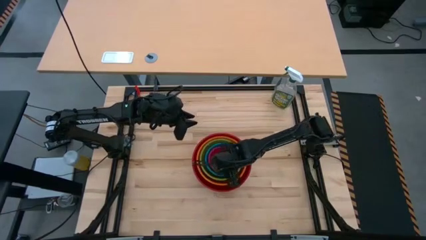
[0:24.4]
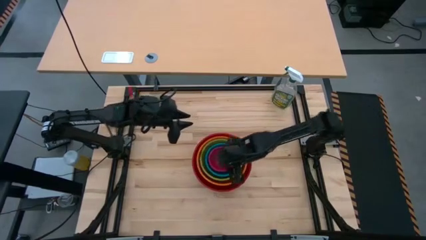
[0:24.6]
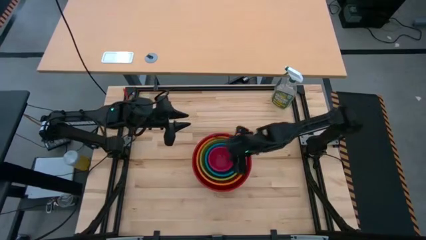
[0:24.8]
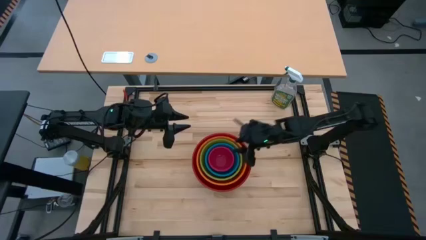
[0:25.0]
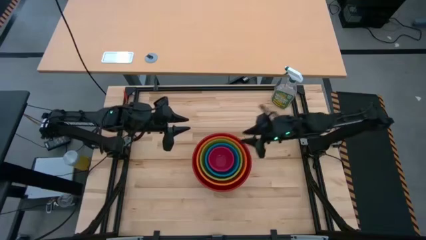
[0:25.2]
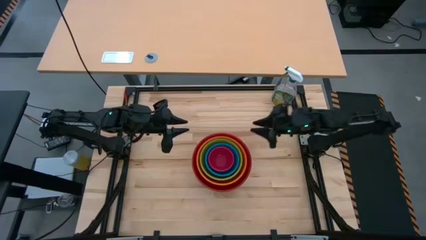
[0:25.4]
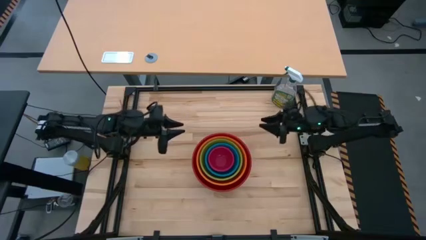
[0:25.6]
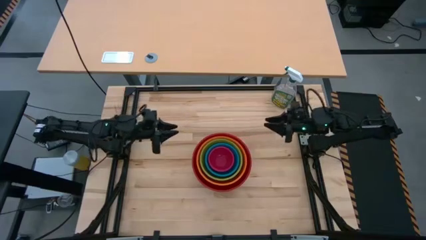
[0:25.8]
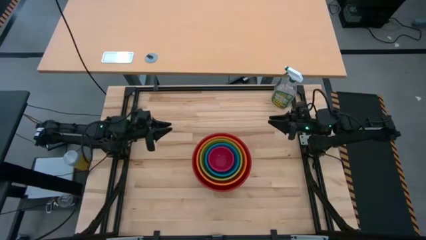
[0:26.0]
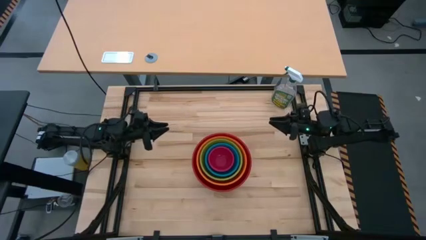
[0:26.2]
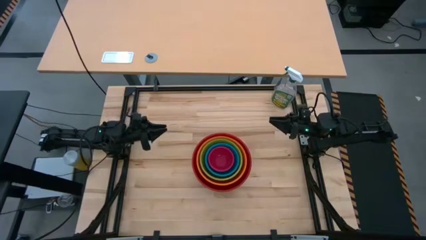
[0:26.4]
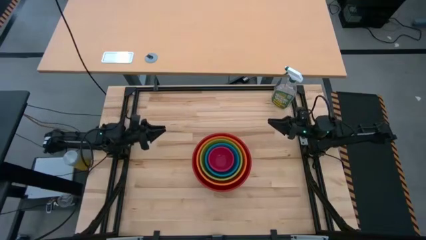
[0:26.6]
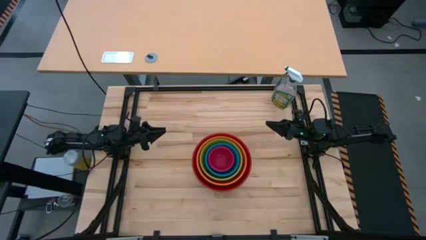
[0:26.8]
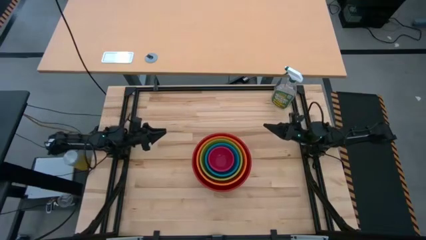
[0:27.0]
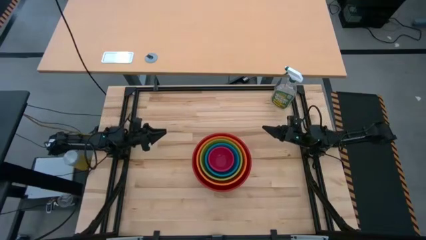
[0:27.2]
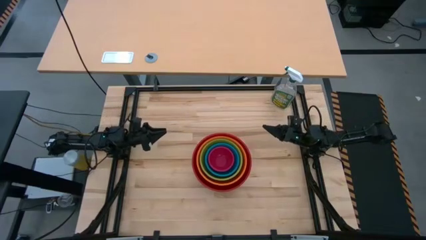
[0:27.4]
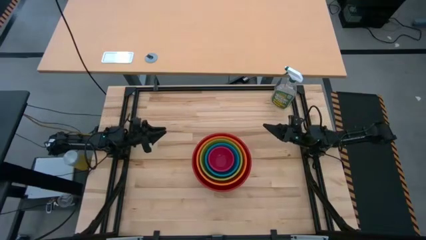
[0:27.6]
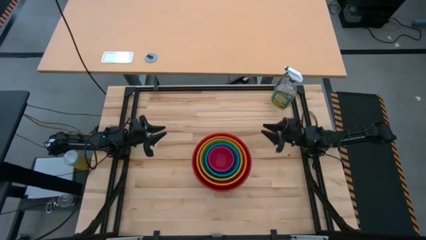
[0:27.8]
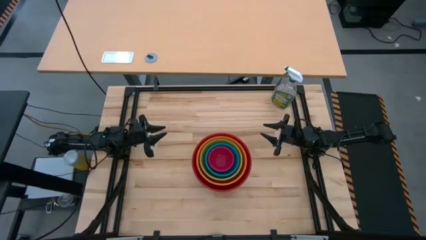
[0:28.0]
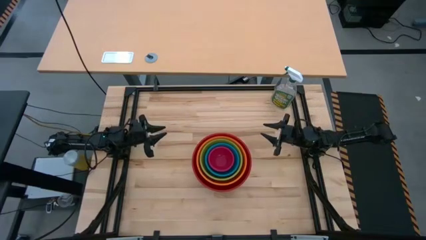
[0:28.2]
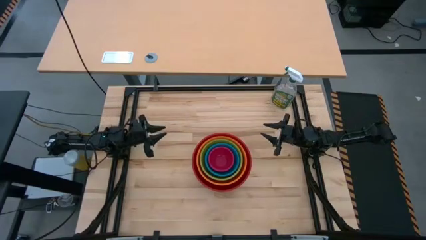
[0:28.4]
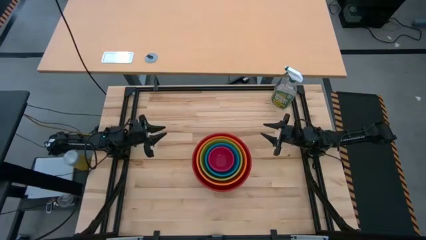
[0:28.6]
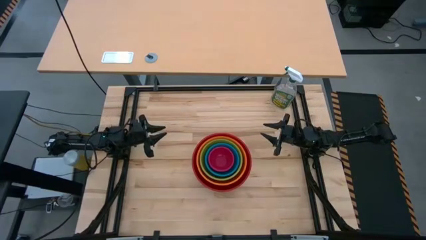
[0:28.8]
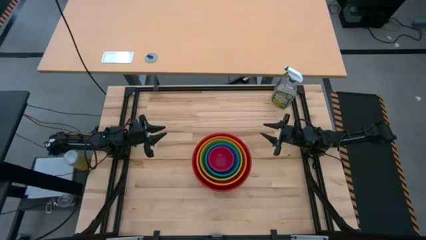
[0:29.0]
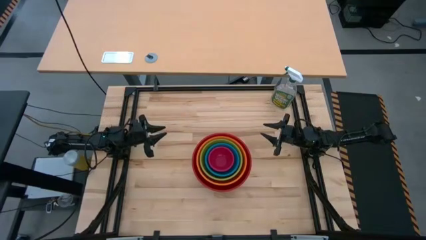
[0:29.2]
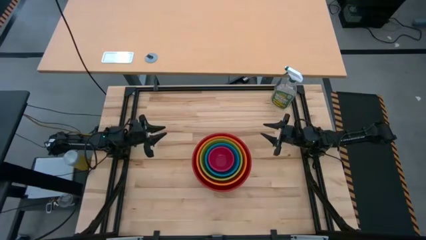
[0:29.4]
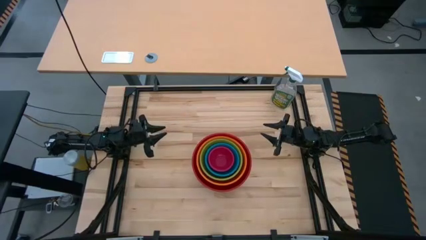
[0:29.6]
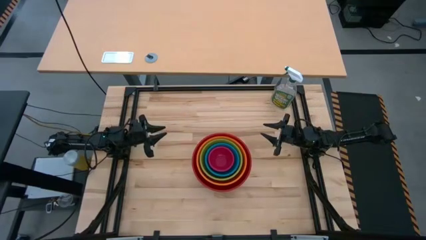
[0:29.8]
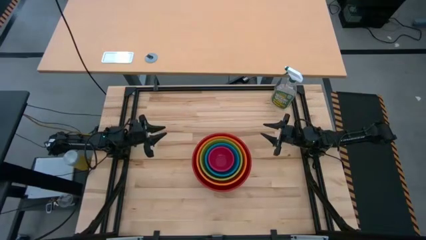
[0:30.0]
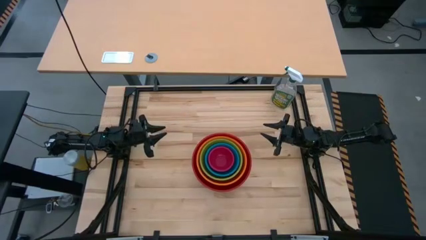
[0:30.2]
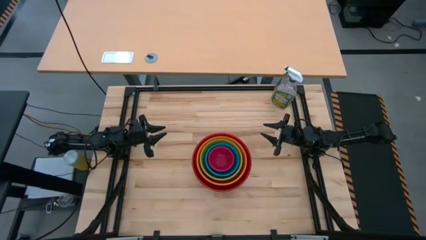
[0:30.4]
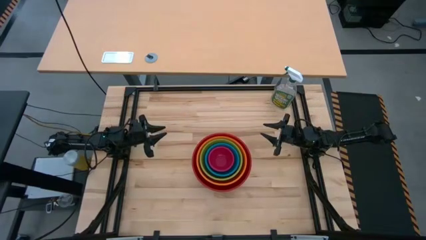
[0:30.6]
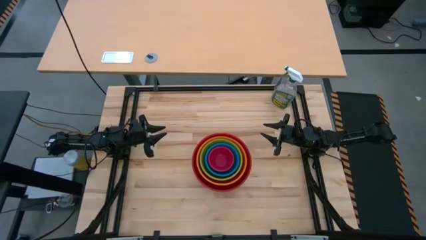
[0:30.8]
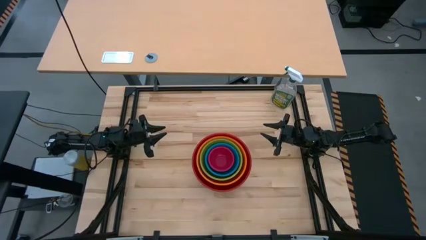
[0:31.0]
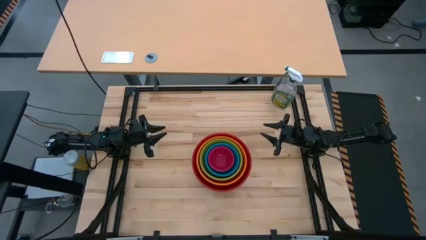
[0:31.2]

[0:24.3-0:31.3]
Task: Nest bowls inside each other by size order
Return to Home Position

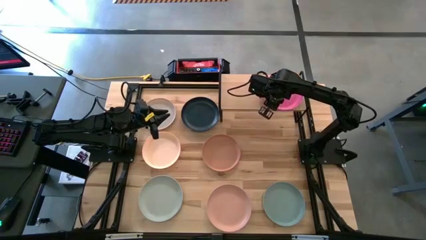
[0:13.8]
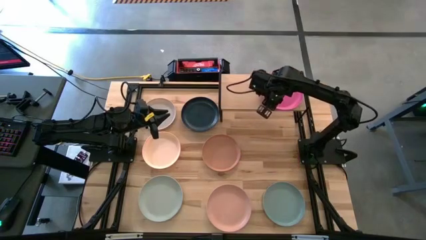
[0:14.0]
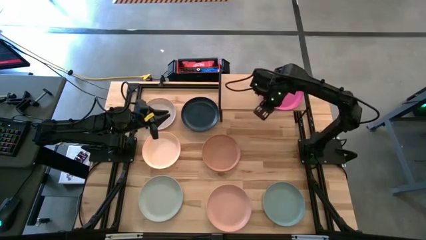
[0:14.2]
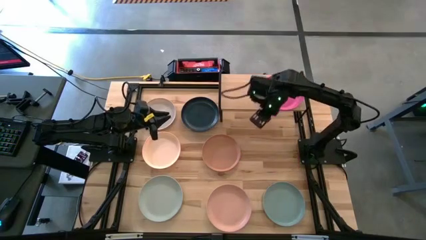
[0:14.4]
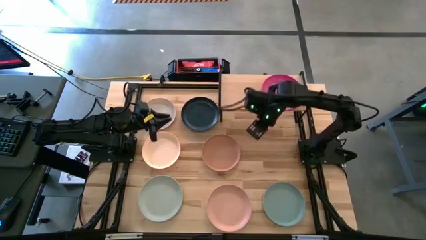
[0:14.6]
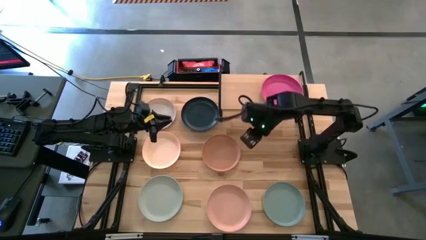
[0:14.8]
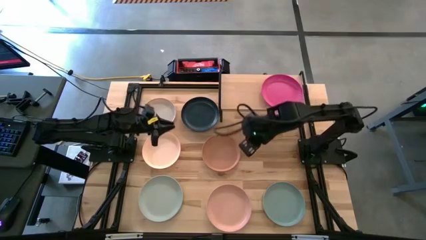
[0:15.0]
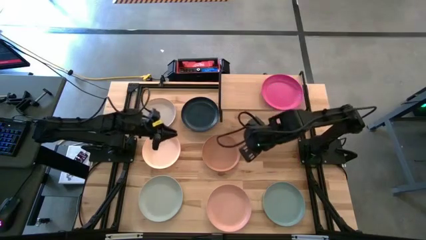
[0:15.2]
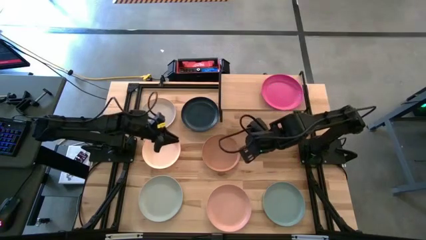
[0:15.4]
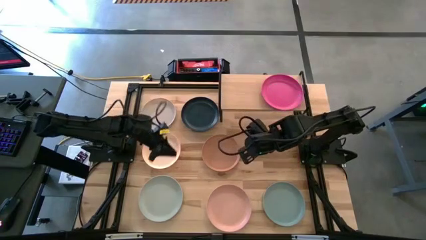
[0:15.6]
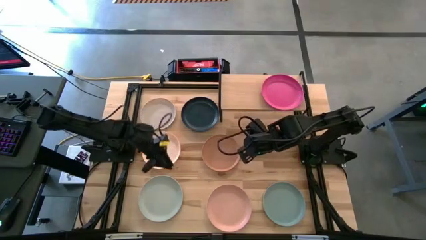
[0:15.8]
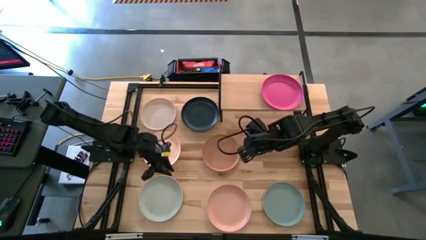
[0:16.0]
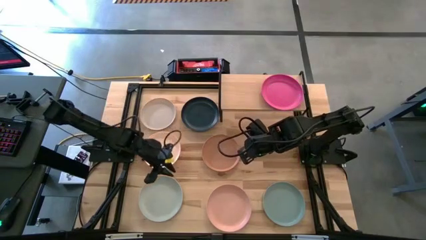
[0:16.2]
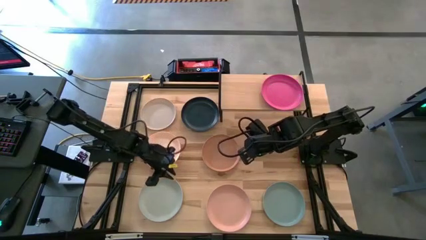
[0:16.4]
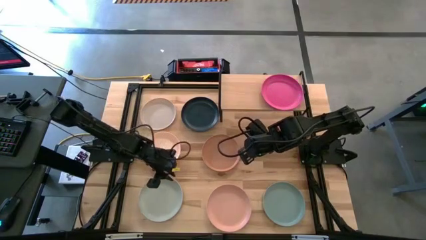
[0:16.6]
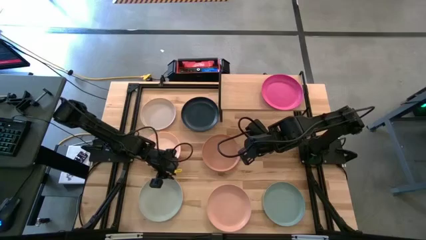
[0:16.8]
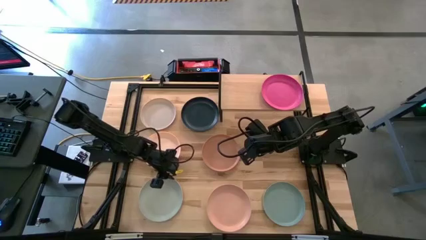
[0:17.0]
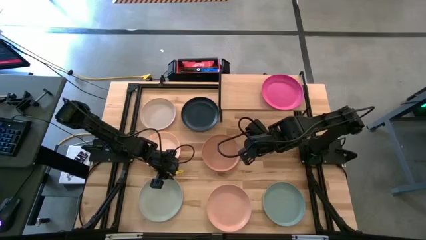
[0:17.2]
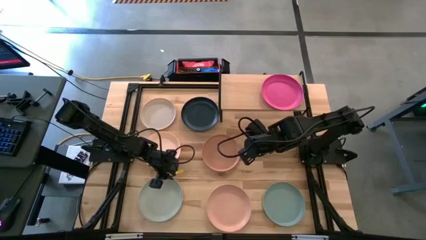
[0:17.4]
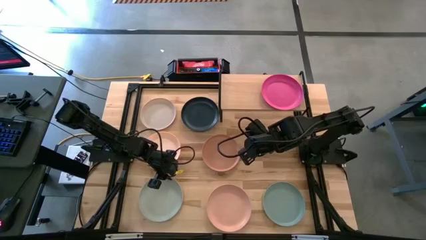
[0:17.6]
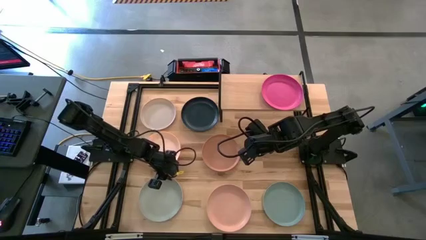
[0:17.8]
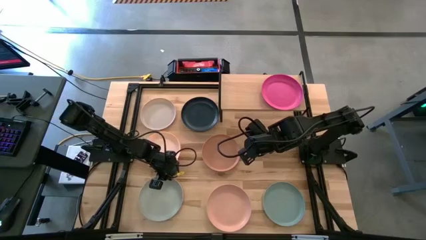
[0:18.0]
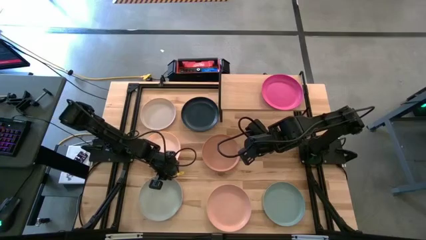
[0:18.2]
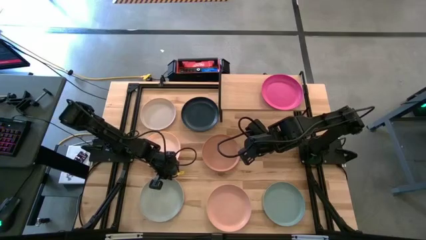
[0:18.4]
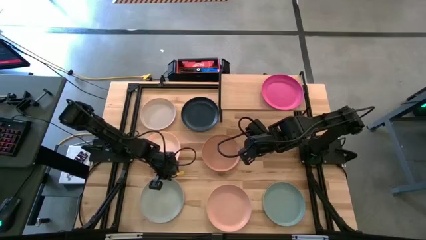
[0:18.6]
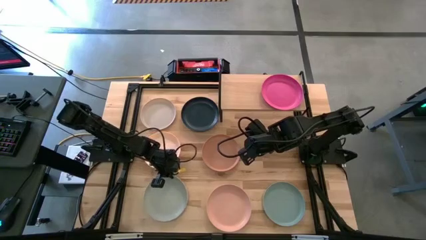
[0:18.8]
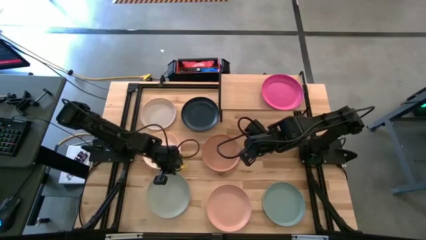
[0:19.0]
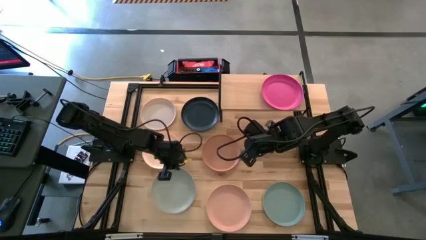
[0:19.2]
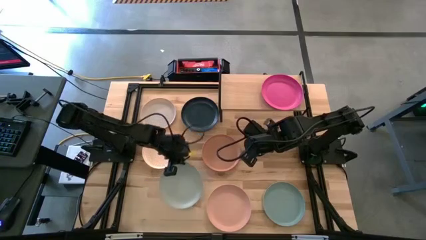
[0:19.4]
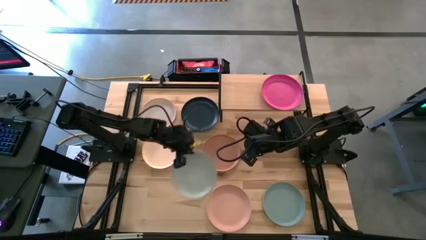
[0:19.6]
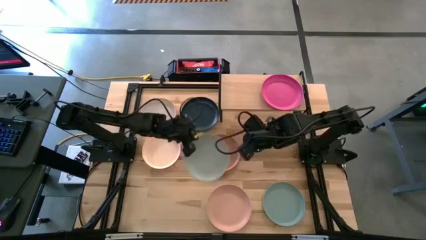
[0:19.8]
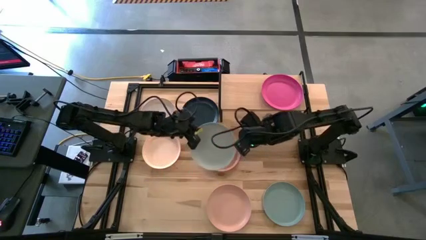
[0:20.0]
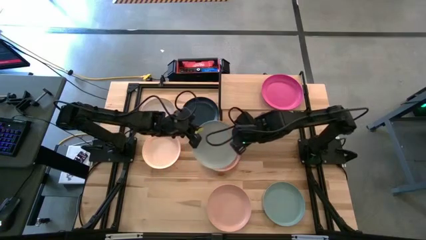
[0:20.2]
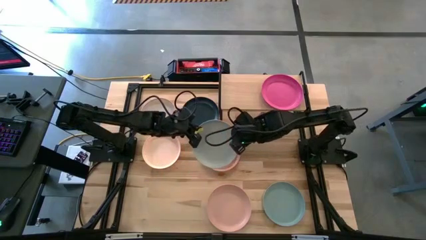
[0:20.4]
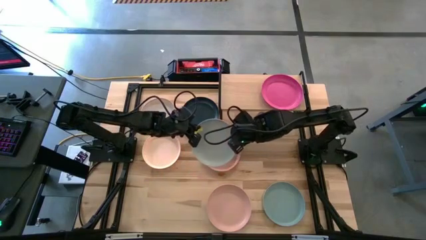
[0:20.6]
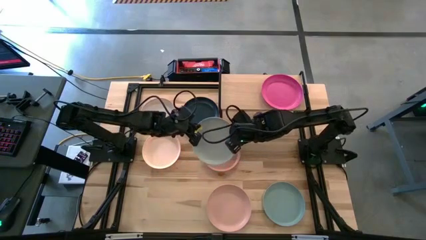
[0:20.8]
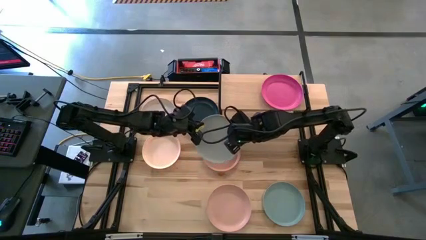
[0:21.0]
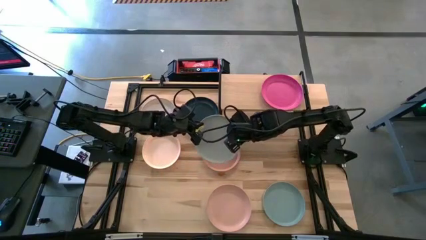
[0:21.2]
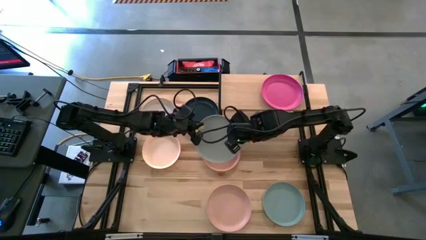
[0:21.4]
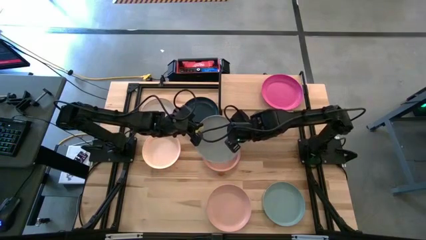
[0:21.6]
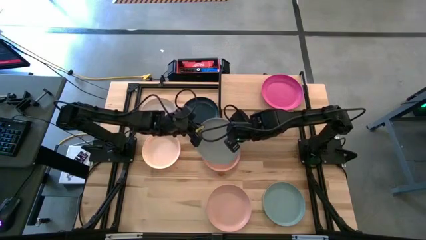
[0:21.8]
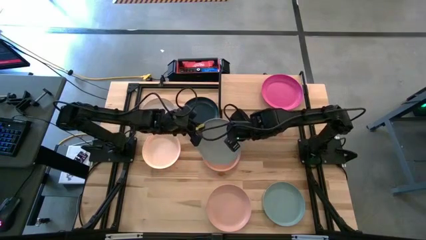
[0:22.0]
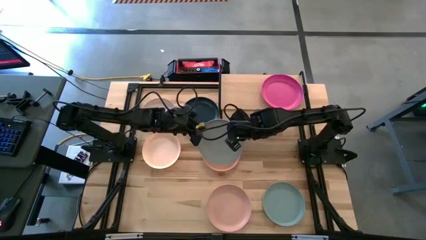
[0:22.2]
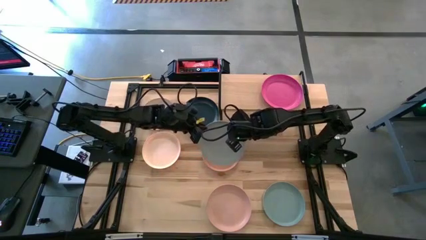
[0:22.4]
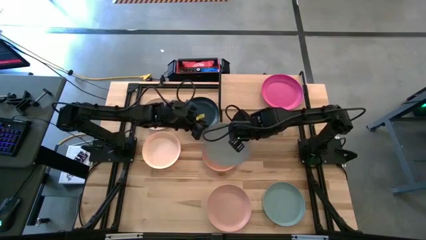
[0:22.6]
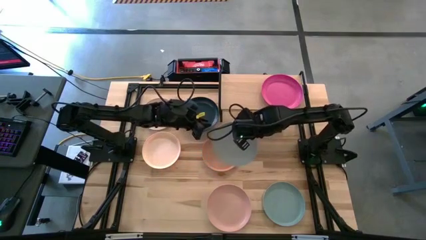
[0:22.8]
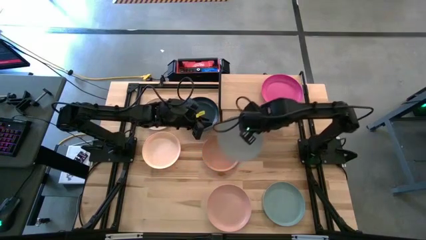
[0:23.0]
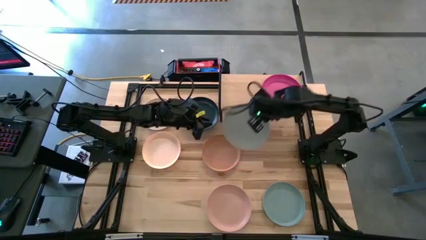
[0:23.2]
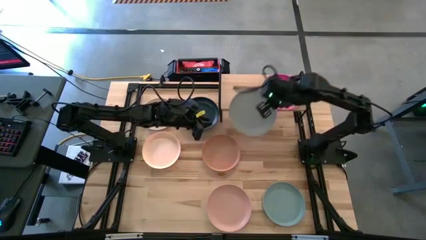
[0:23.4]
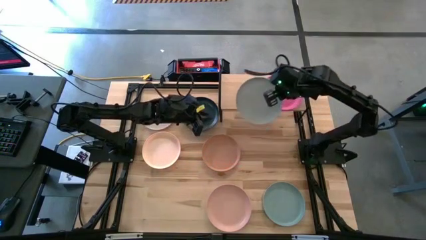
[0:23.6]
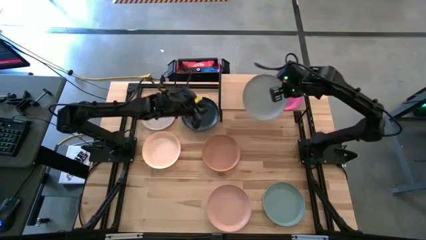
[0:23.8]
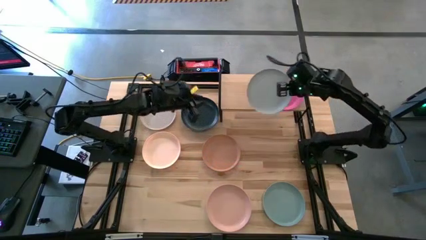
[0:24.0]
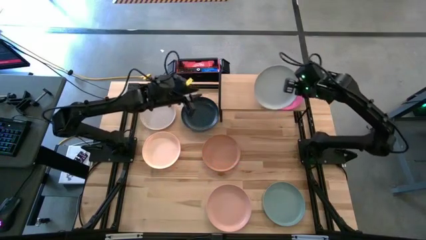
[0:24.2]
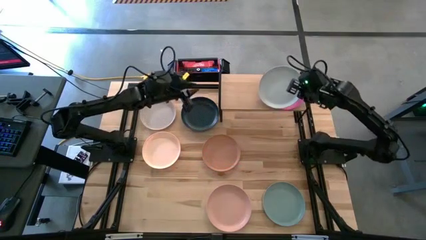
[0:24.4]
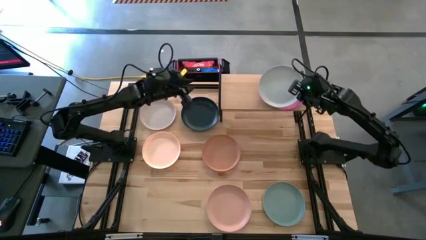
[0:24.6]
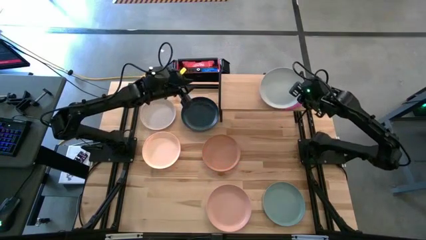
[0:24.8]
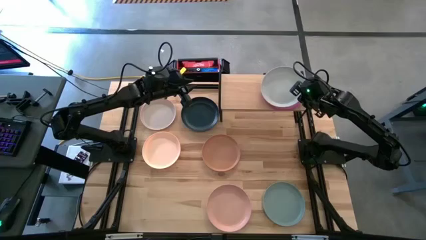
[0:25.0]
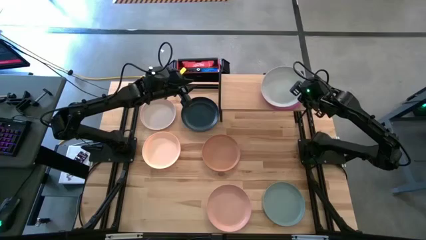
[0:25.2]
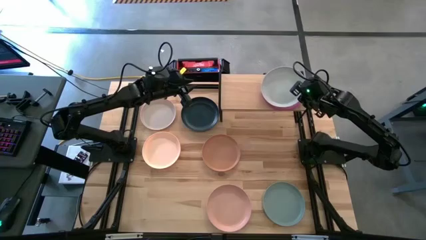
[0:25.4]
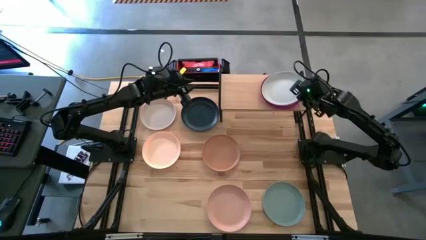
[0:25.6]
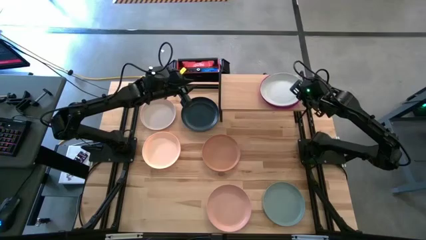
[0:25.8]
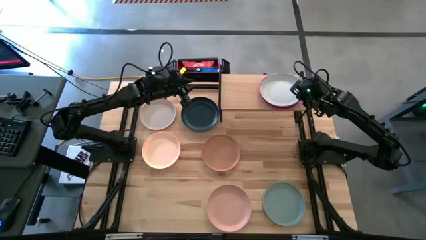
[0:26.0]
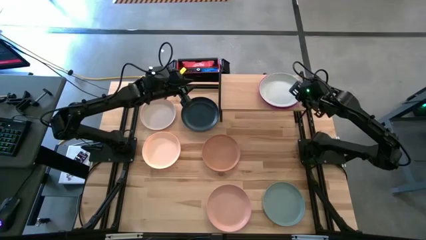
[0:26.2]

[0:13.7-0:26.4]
Task: Place and stack plates onto a shelf
Stack the gray plate on top of the pink plate on the shelf
